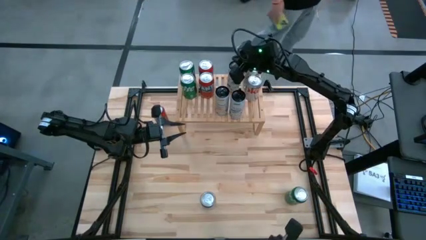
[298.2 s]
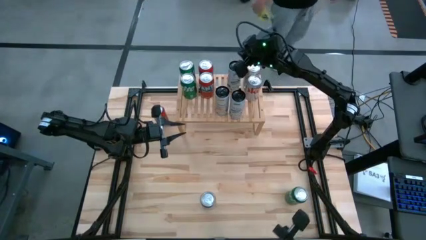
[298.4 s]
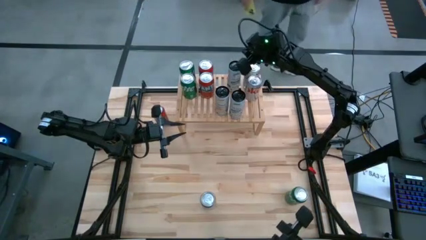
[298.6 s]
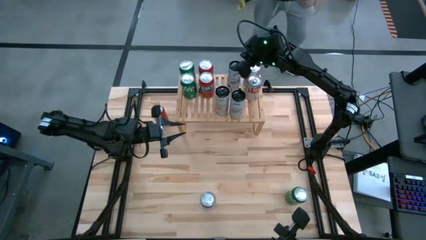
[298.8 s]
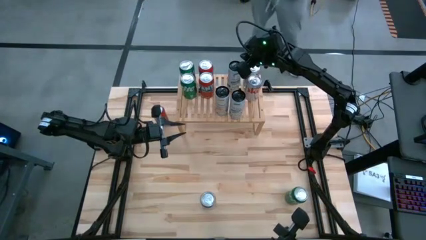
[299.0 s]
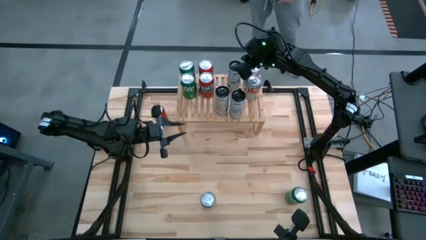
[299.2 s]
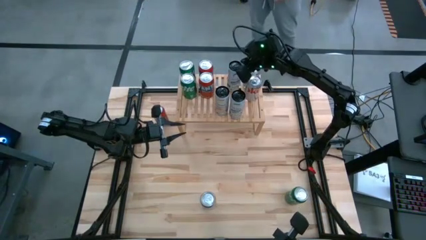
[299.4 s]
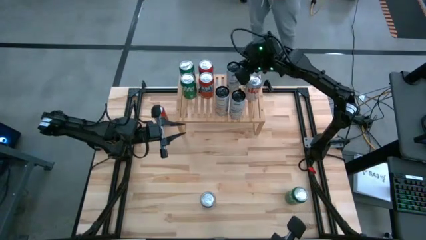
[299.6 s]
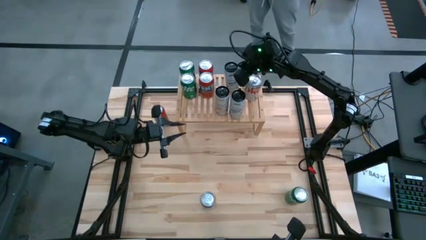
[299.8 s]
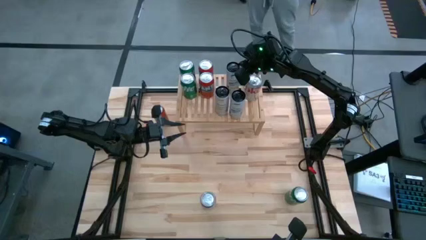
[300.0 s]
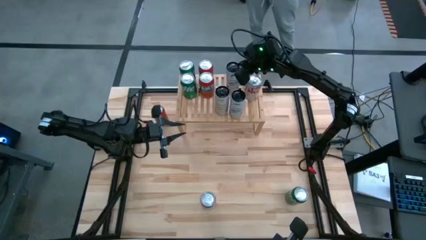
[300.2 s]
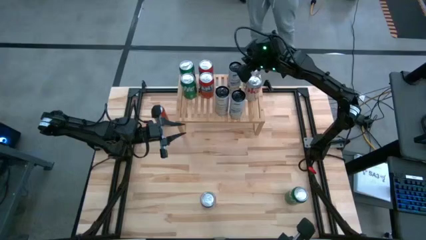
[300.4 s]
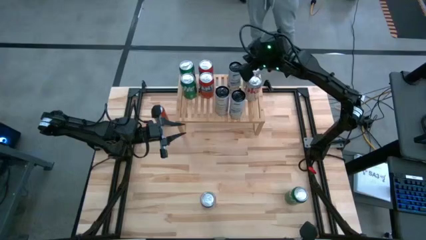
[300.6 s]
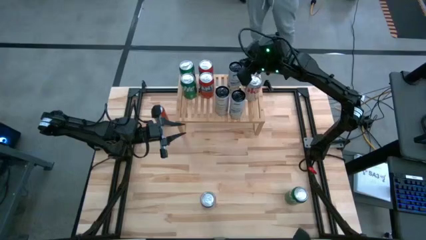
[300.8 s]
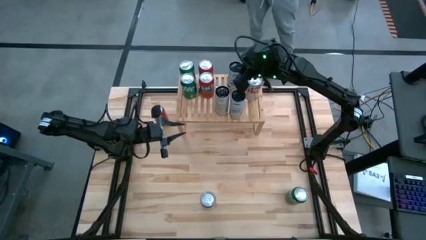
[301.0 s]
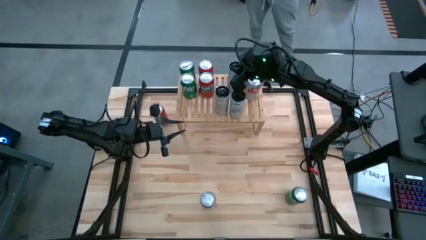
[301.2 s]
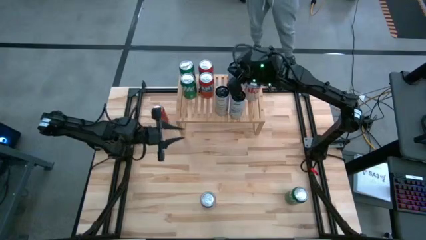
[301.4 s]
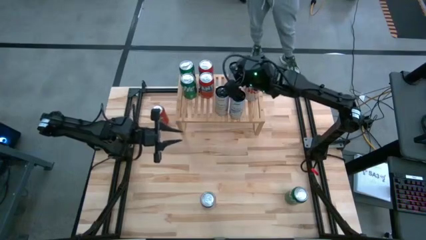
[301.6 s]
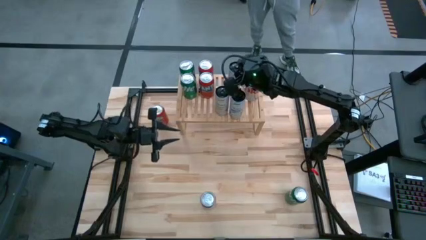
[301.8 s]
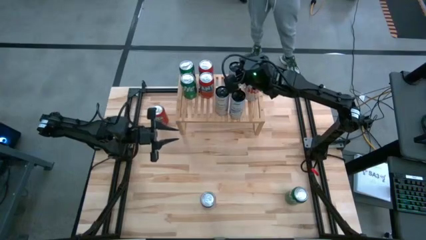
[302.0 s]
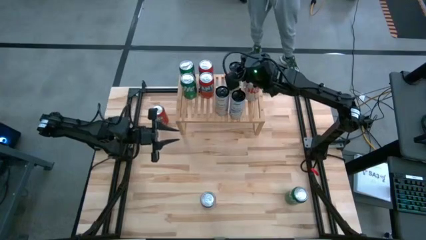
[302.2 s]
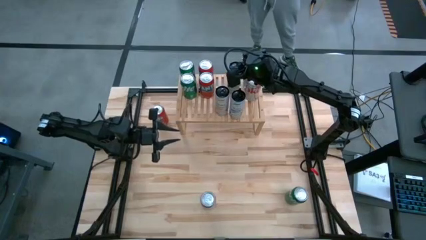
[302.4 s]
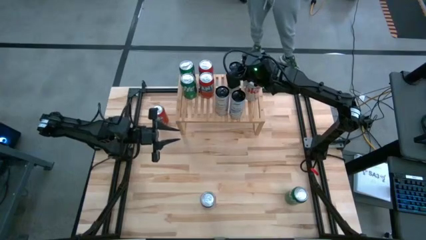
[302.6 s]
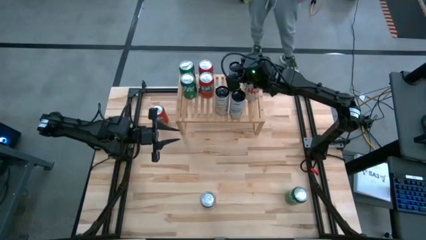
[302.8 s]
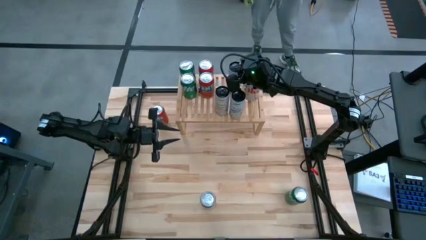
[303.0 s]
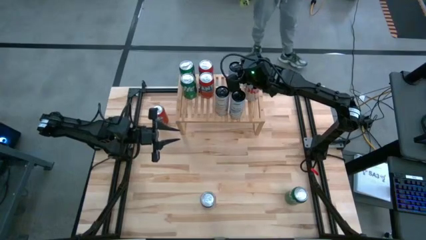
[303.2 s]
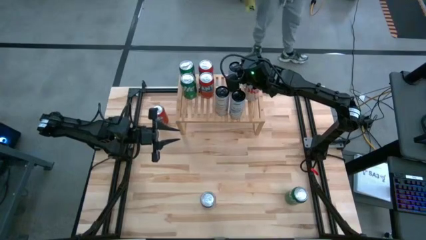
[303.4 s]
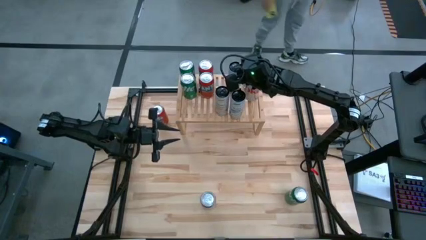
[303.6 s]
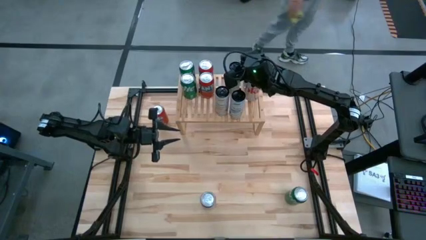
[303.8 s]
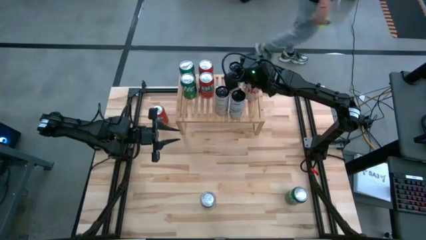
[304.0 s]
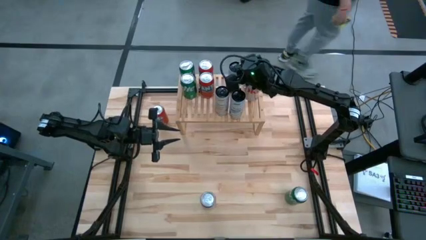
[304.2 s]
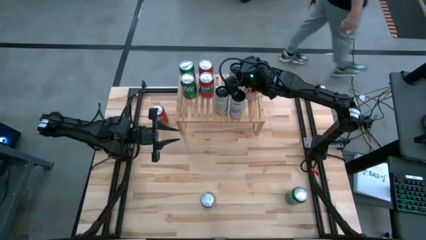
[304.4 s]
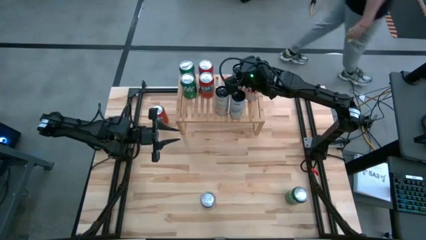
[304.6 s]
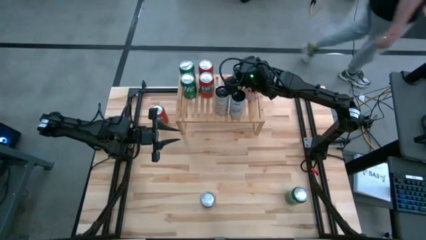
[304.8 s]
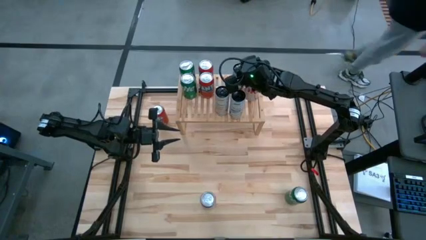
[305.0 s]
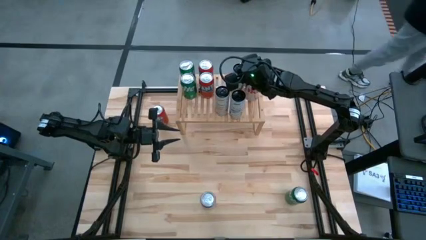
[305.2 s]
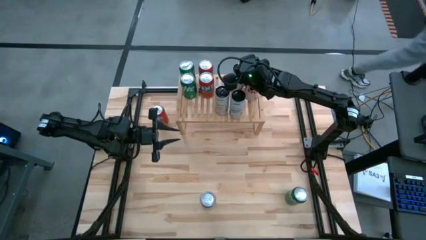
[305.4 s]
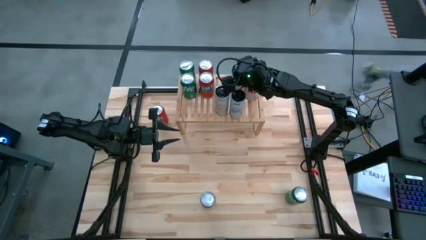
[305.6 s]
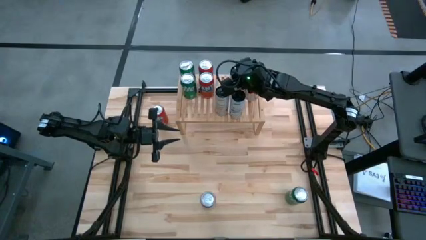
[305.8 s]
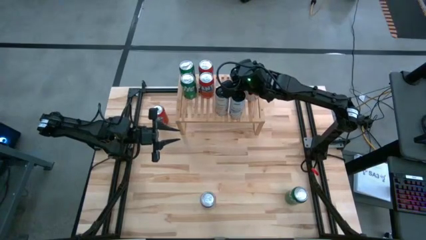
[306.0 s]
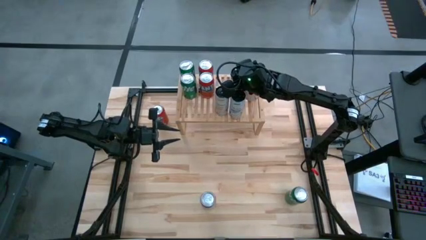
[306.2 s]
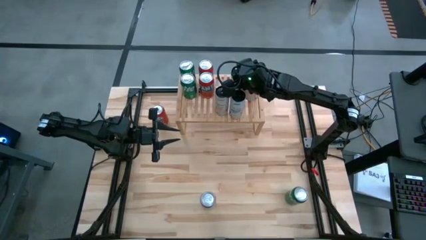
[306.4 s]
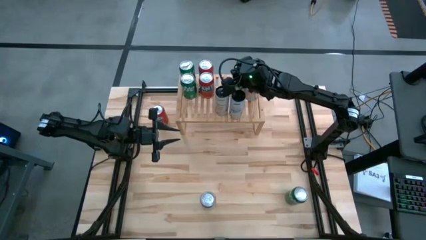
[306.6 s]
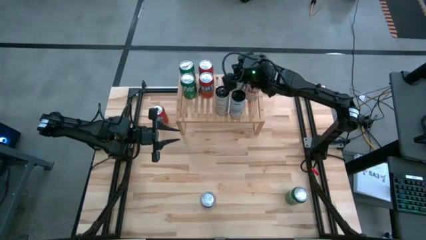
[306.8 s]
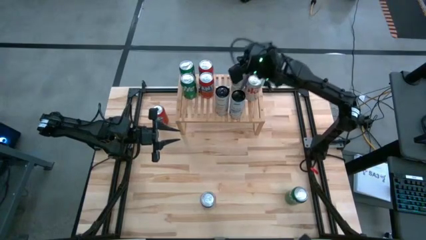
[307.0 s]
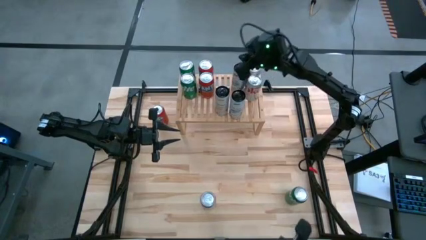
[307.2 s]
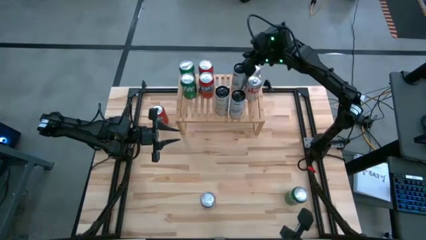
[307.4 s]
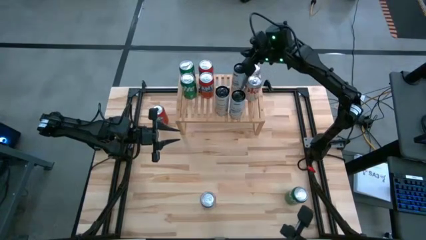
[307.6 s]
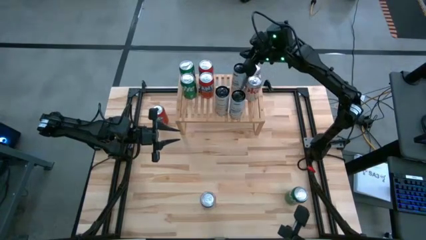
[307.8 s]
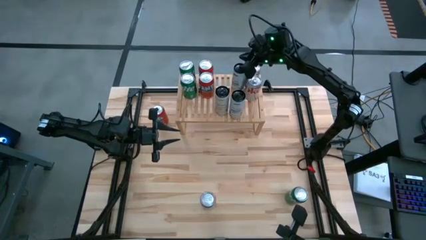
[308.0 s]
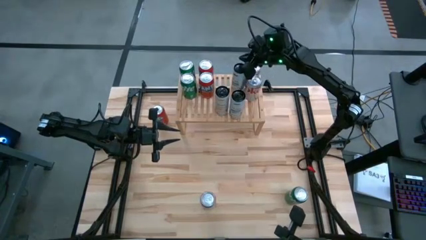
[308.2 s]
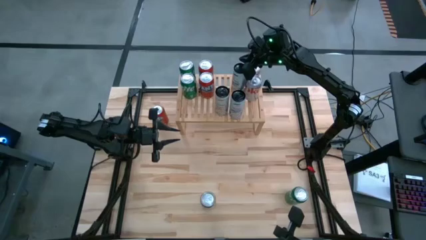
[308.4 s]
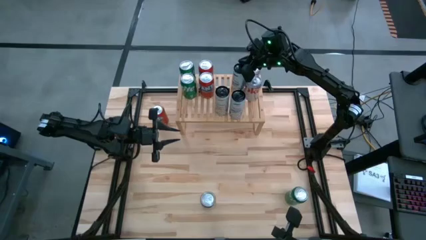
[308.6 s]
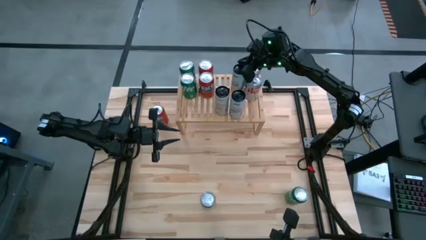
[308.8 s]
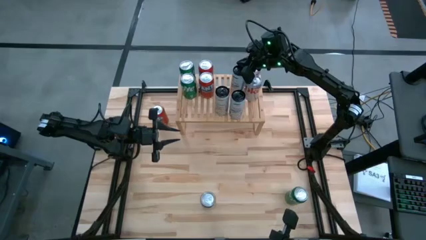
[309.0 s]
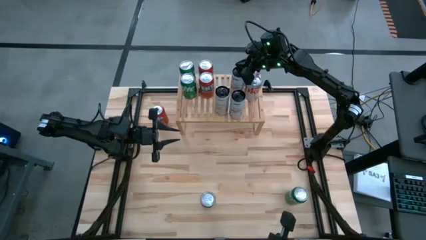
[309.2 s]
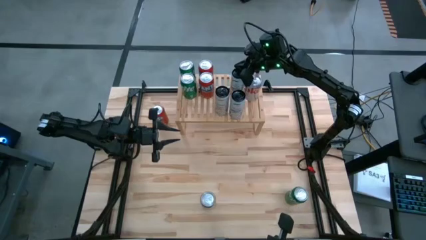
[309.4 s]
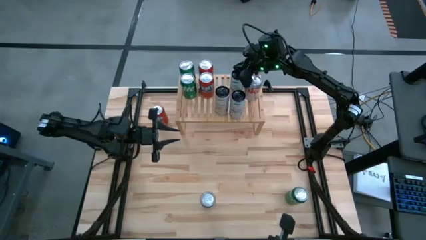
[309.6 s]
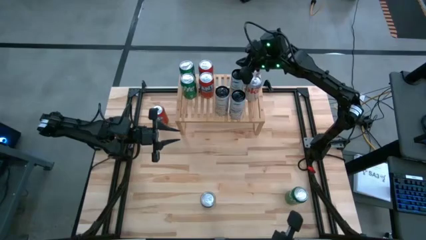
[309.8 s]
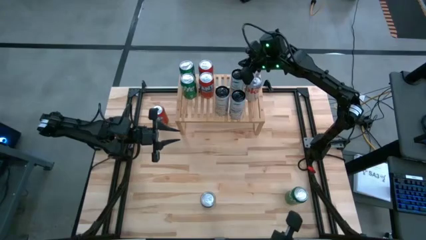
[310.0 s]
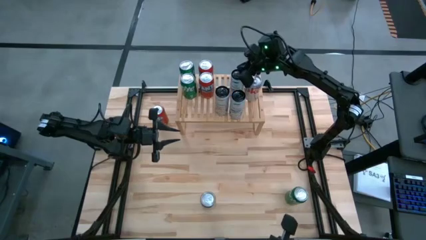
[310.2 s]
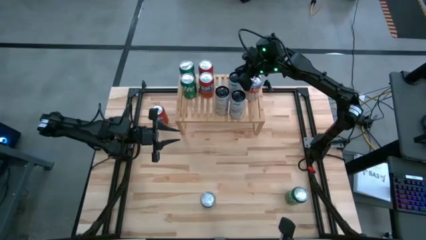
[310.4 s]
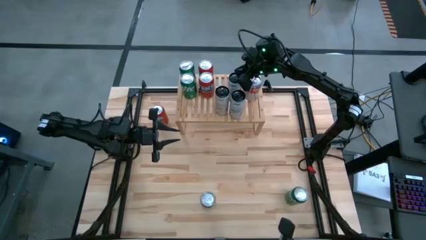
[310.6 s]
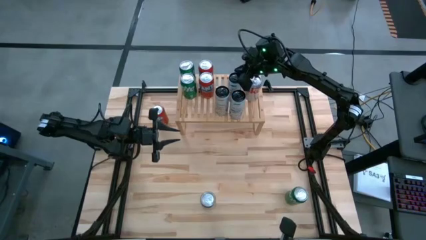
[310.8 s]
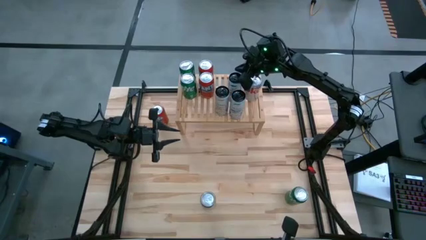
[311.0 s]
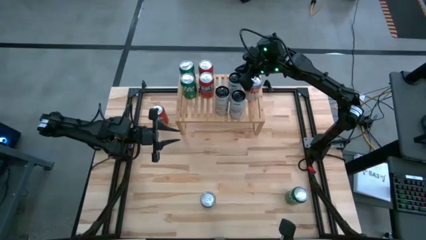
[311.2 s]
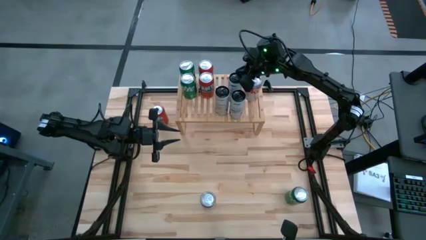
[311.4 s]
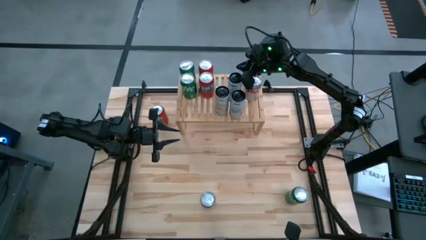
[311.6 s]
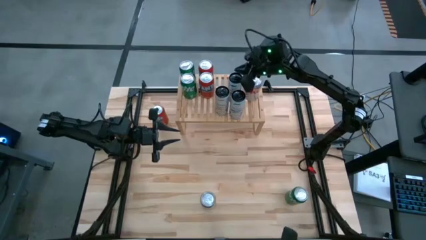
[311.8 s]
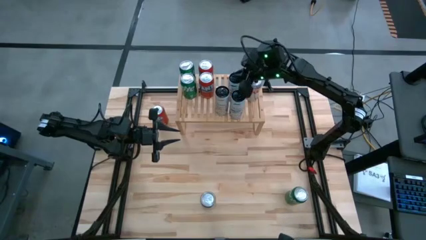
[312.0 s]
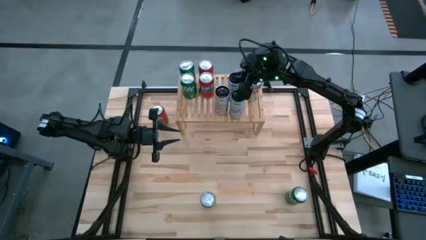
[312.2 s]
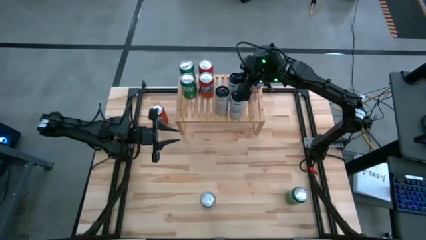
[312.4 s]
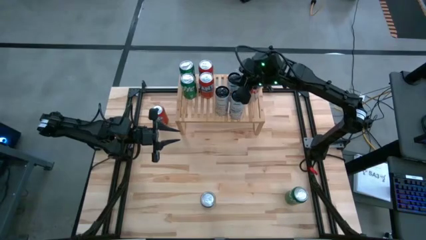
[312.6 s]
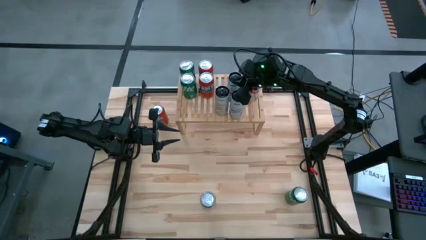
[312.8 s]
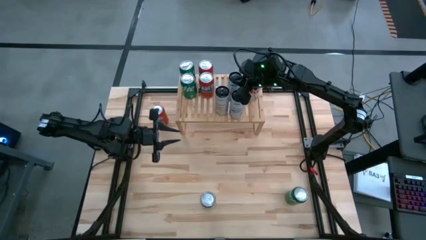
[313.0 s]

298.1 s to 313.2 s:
Task: Place canned beverage on shelf
Adjust the soda cans on the shelf
